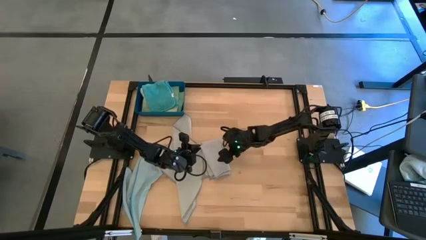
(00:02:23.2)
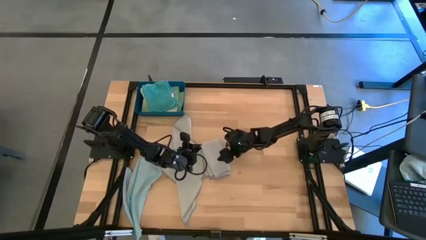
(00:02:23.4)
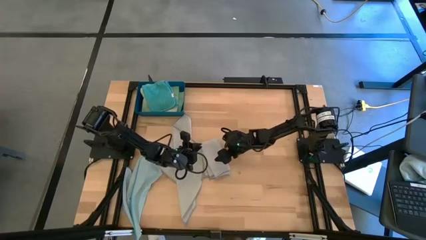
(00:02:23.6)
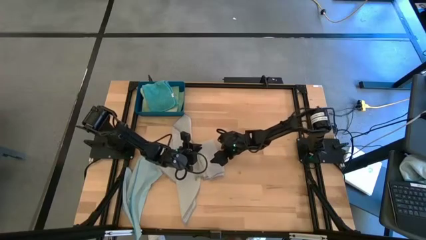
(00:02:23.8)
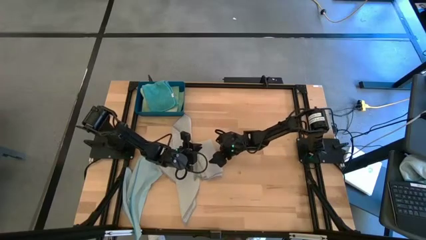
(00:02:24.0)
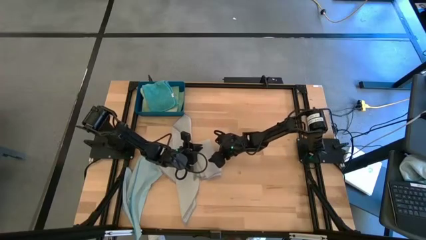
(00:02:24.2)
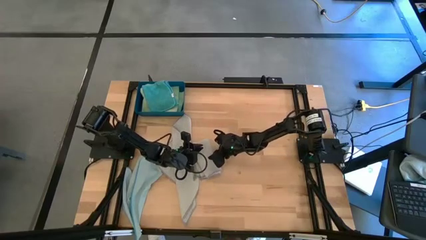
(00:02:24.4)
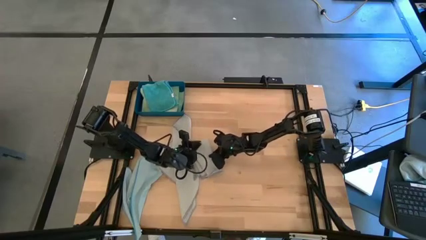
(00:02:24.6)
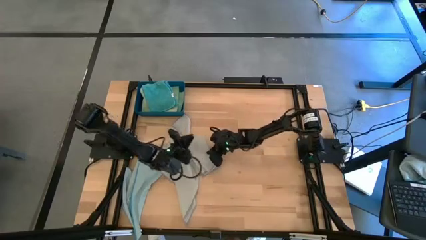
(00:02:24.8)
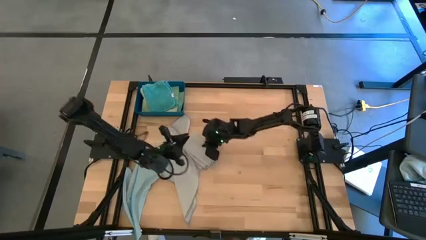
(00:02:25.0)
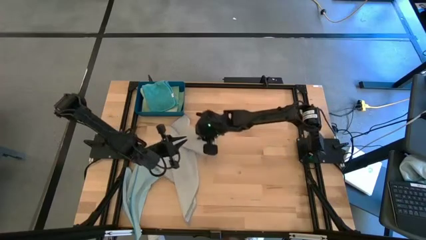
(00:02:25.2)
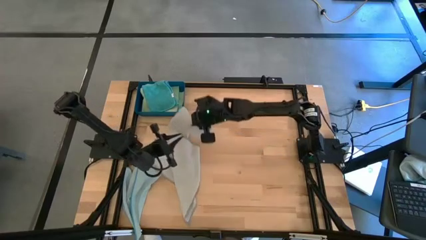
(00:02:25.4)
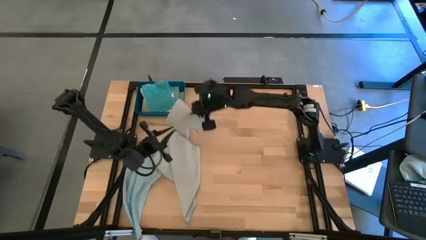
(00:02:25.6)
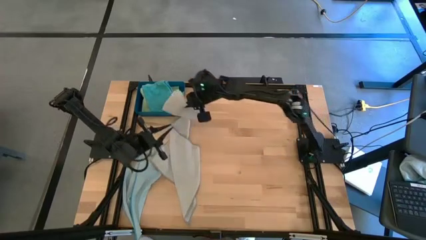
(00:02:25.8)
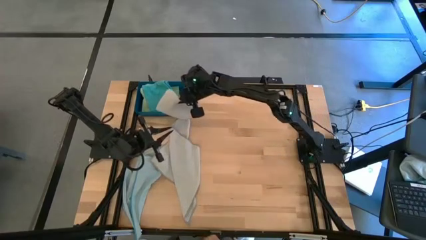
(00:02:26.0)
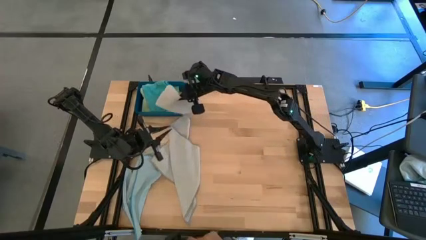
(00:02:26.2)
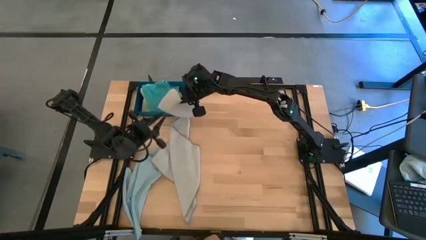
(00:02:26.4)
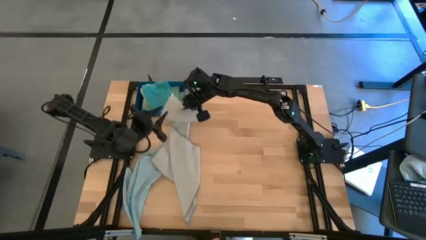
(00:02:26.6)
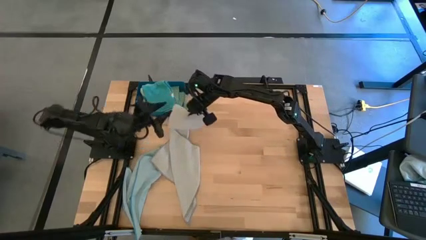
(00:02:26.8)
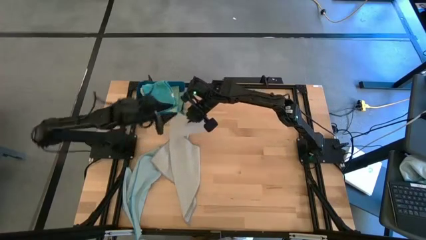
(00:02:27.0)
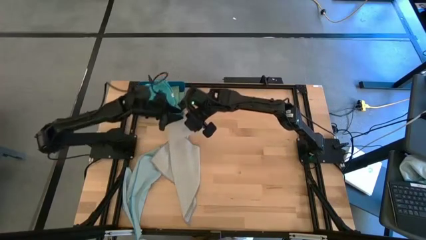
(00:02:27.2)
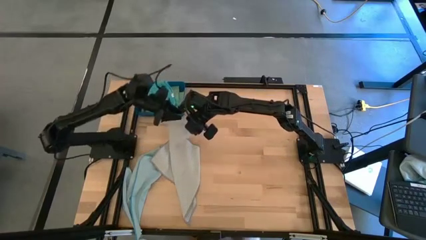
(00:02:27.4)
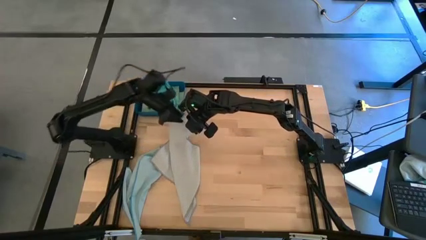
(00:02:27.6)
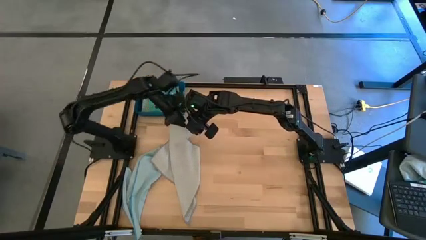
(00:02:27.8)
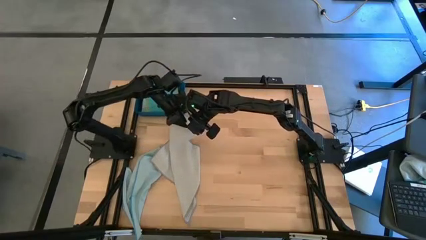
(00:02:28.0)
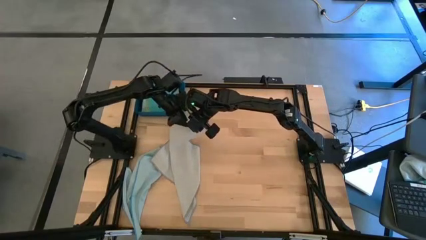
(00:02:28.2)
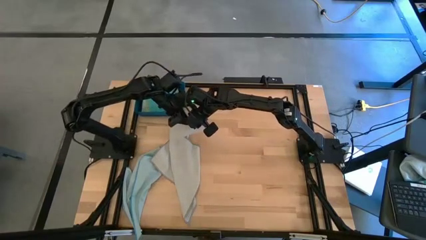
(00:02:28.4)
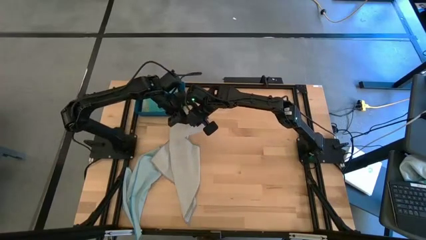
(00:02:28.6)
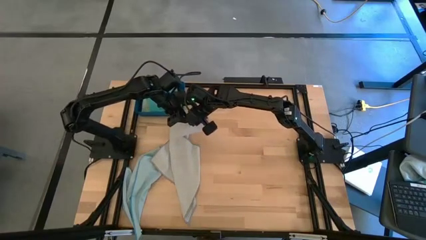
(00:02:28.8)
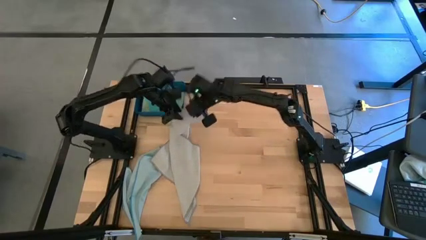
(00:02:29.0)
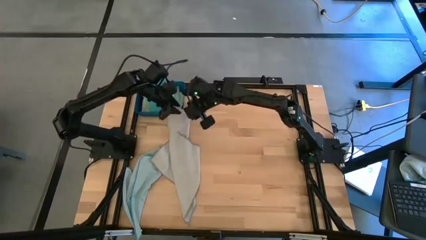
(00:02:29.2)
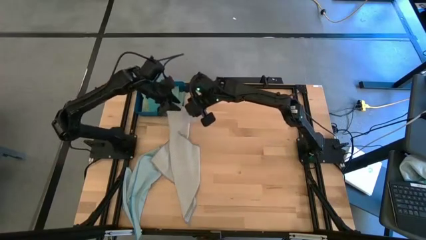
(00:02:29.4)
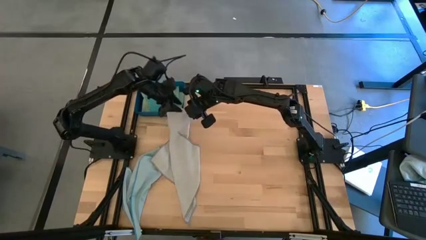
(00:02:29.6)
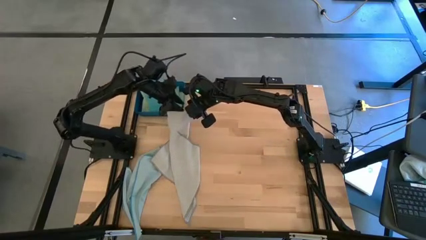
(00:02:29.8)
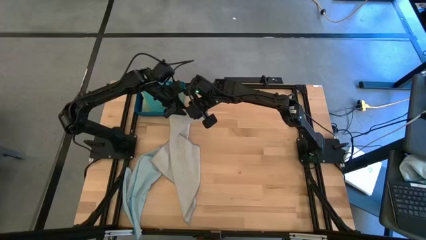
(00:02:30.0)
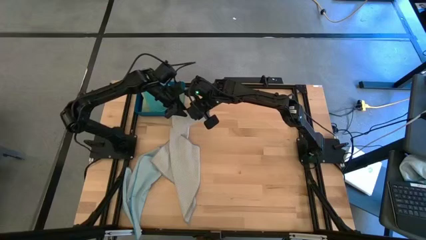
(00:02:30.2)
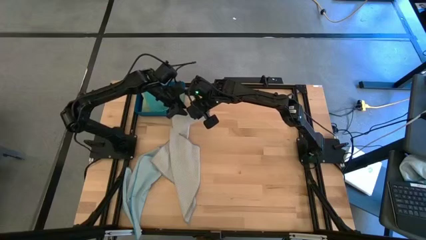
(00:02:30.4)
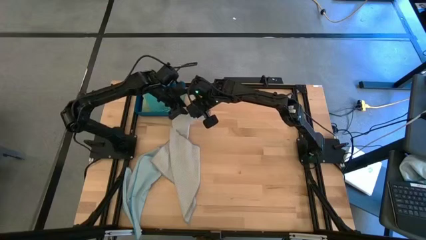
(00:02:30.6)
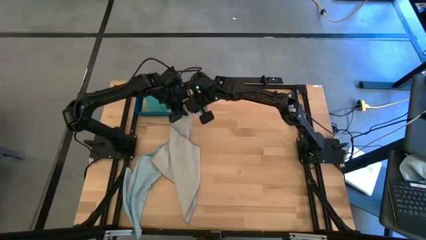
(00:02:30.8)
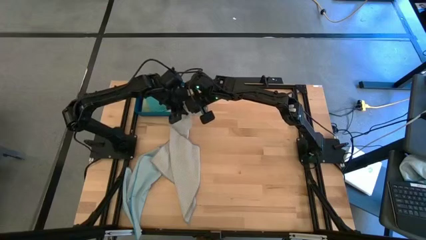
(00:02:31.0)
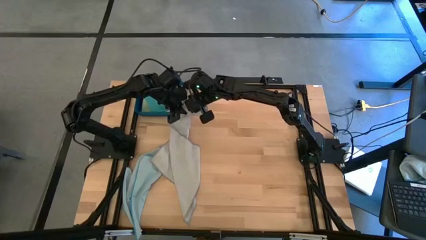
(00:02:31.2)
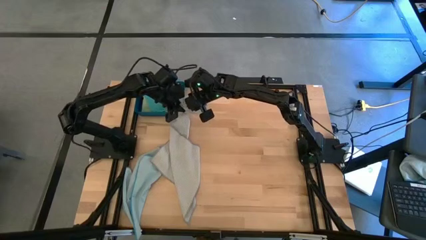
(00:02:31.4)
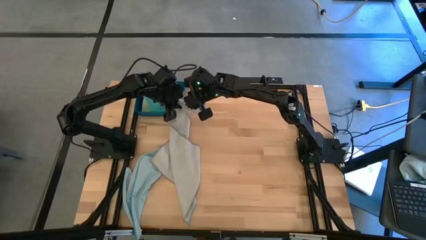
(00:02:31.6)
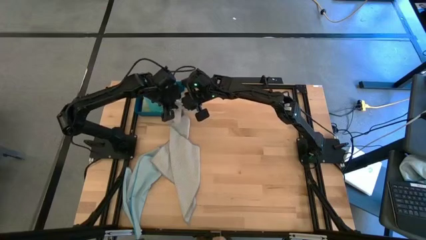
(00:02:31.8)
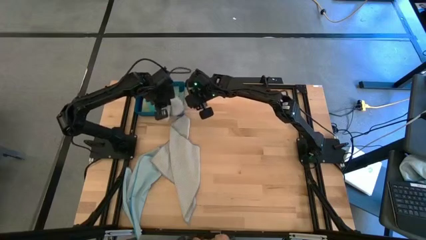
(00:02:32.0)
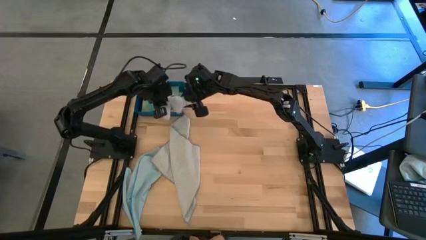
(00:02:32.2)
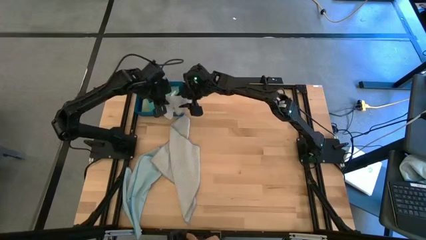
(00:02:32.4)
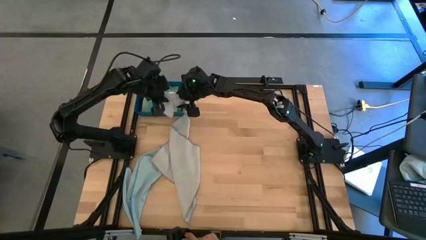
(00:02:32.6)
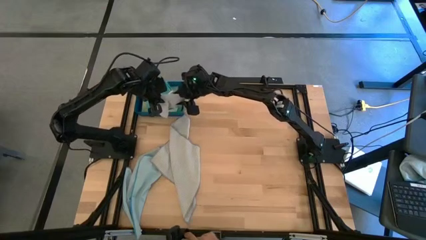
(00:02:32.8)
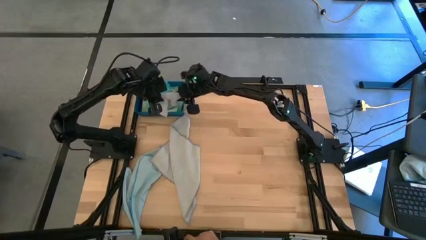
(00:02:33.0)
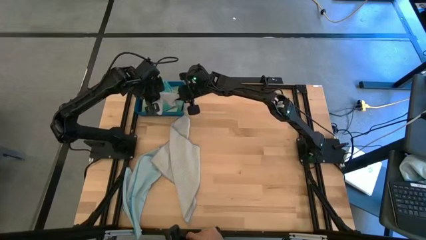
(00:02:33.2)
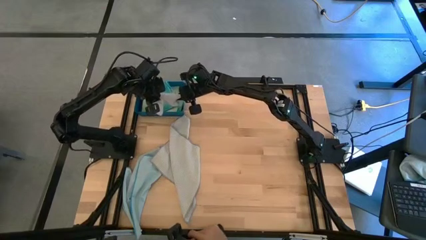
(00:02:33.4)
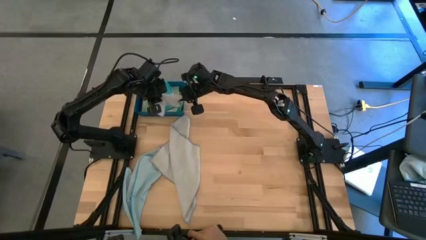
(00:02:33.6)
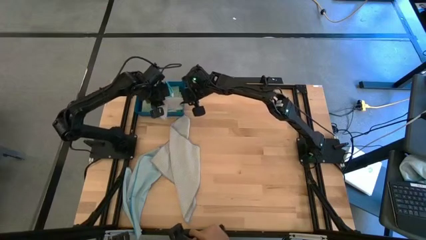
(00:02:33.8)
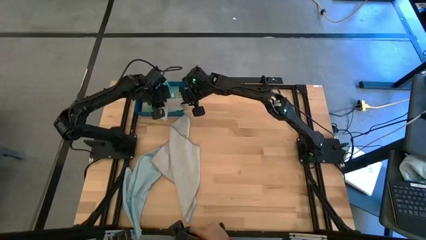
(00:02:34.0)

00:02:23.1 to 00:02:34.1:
Task: Fold microfiber towels
Put the right gray towel into the blue bin
